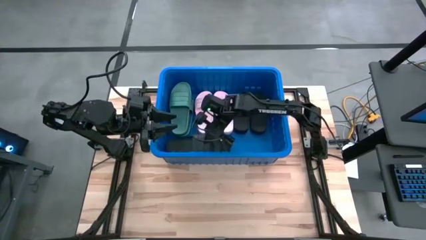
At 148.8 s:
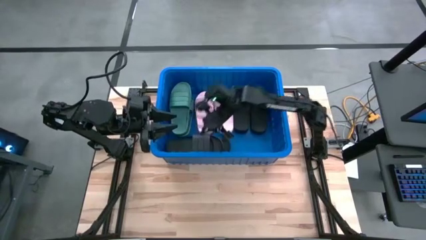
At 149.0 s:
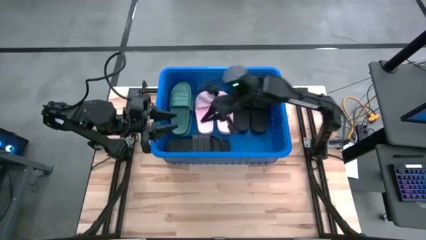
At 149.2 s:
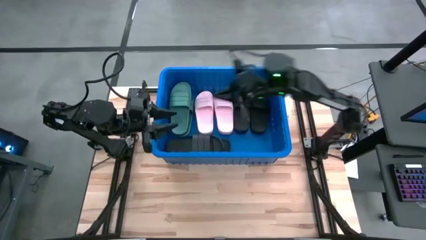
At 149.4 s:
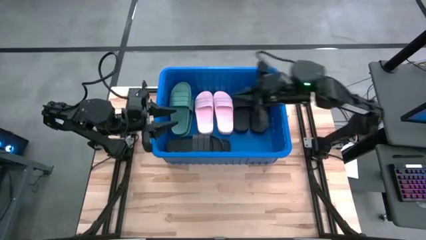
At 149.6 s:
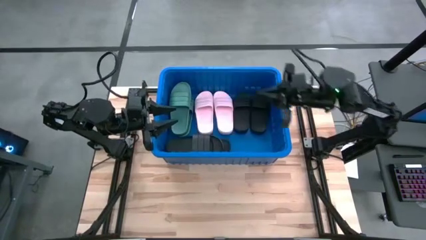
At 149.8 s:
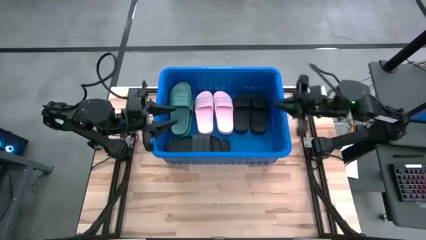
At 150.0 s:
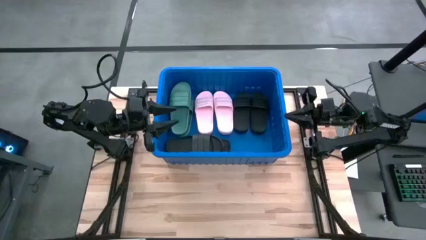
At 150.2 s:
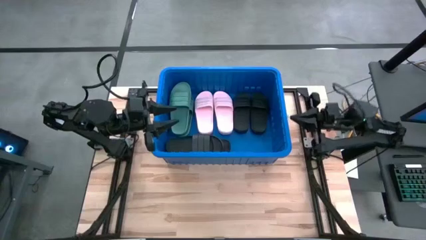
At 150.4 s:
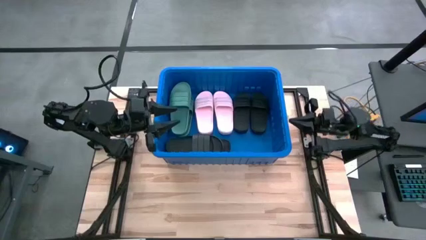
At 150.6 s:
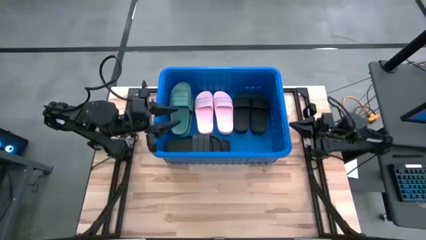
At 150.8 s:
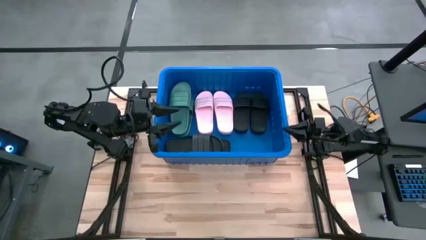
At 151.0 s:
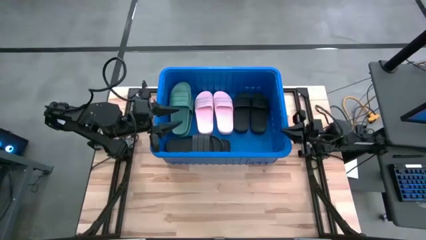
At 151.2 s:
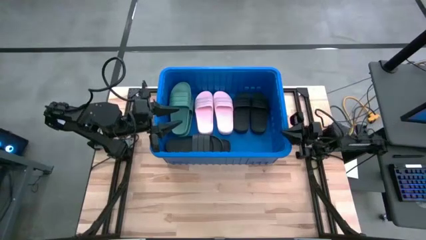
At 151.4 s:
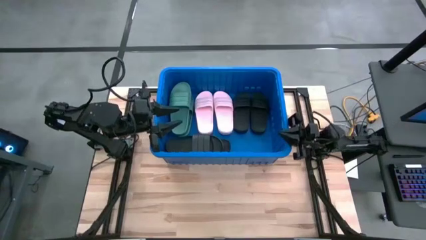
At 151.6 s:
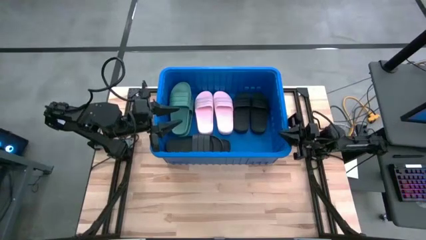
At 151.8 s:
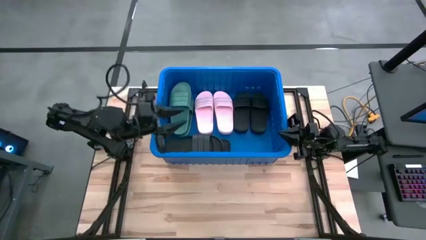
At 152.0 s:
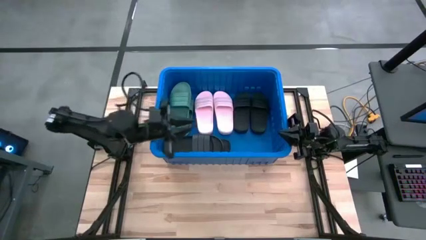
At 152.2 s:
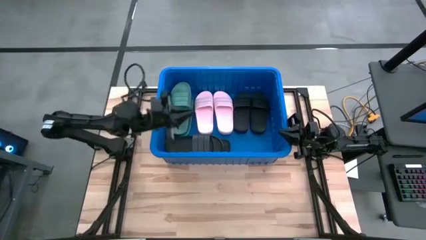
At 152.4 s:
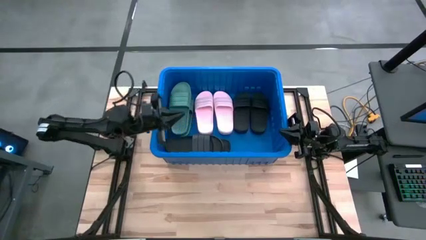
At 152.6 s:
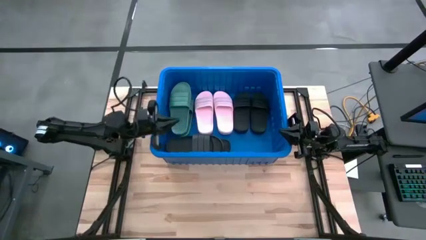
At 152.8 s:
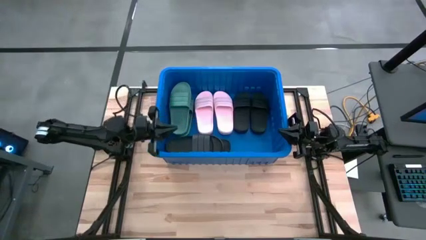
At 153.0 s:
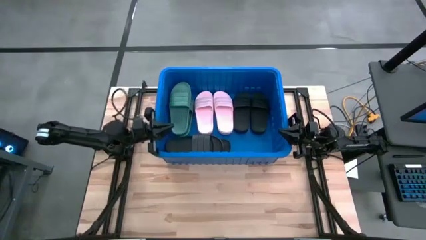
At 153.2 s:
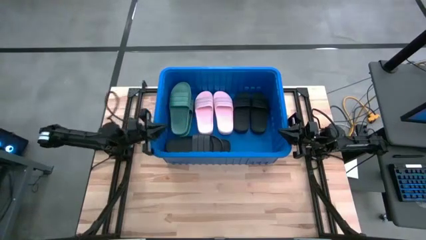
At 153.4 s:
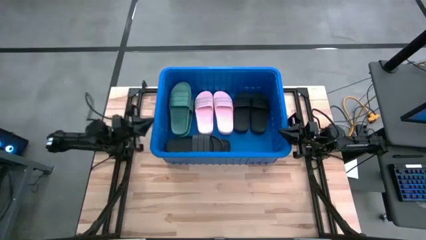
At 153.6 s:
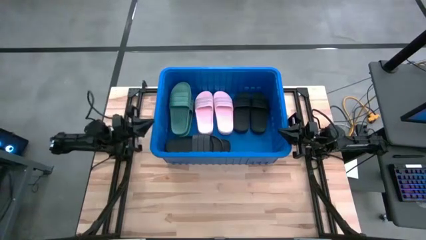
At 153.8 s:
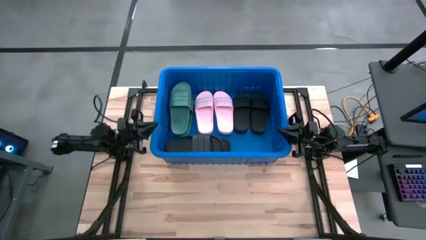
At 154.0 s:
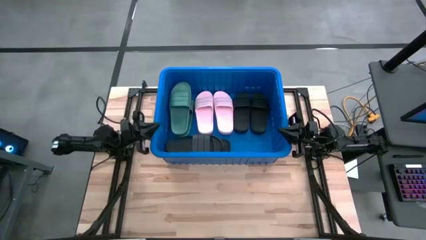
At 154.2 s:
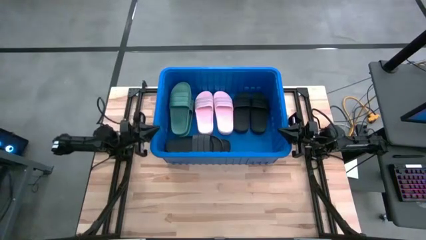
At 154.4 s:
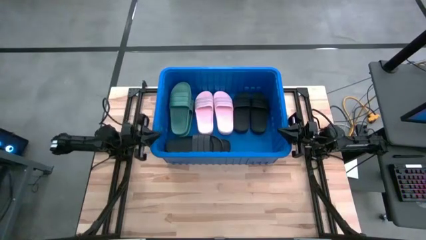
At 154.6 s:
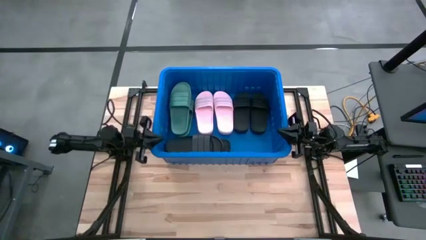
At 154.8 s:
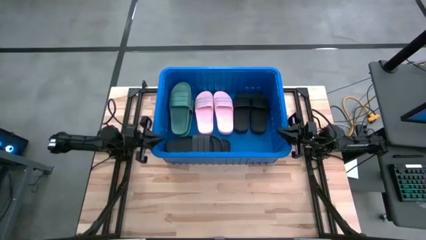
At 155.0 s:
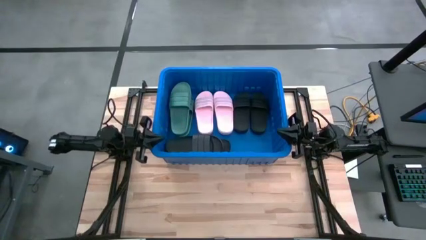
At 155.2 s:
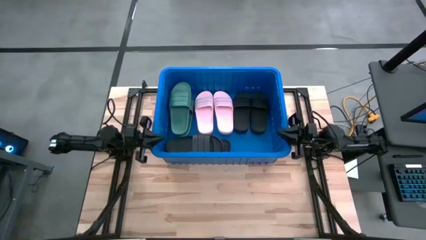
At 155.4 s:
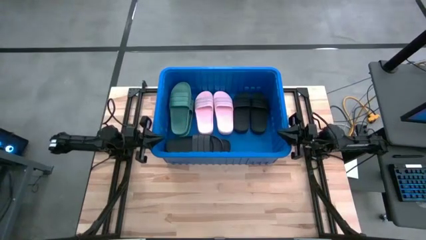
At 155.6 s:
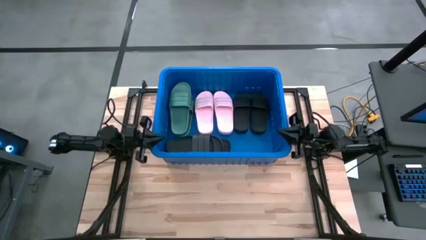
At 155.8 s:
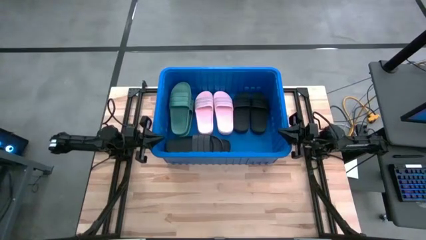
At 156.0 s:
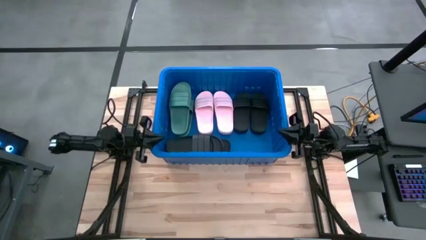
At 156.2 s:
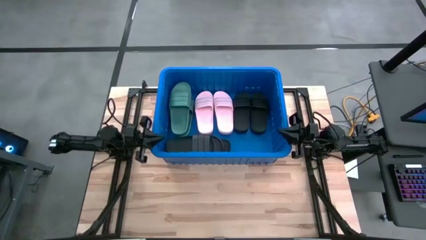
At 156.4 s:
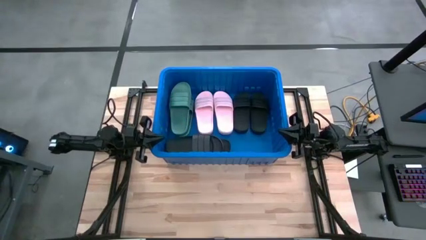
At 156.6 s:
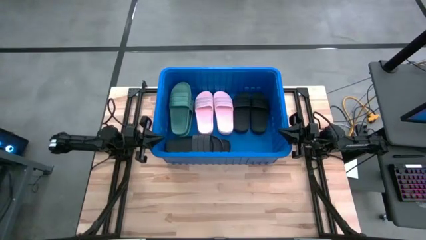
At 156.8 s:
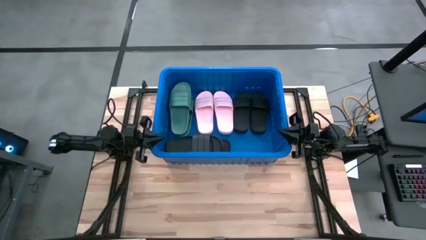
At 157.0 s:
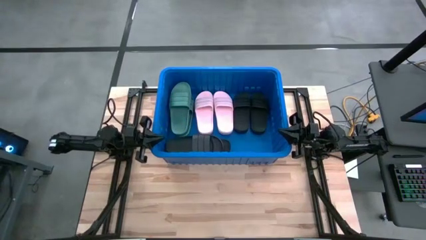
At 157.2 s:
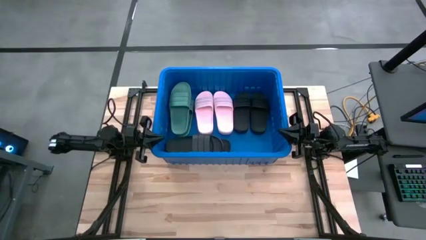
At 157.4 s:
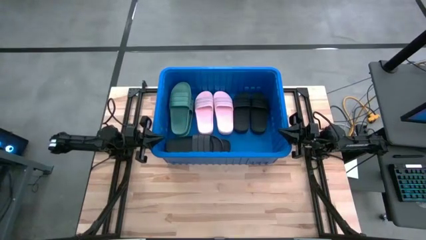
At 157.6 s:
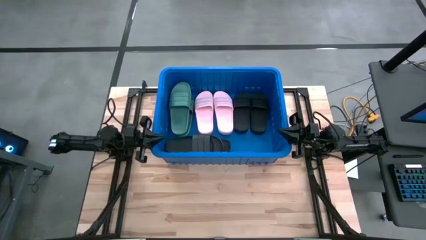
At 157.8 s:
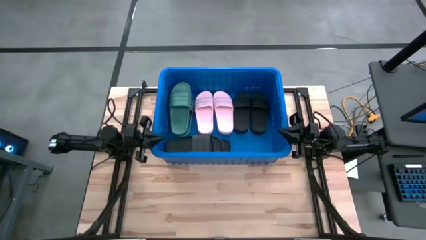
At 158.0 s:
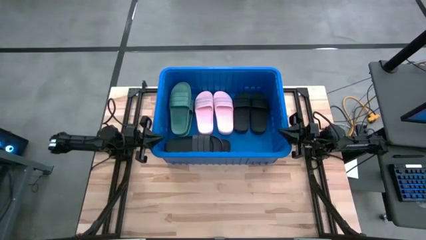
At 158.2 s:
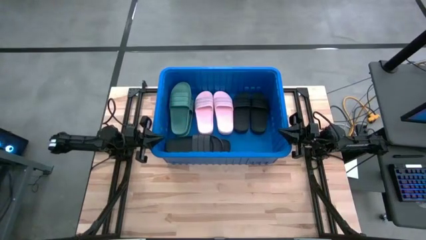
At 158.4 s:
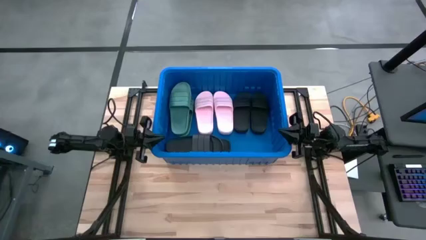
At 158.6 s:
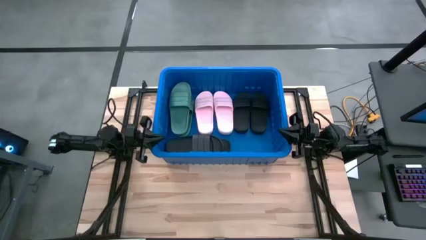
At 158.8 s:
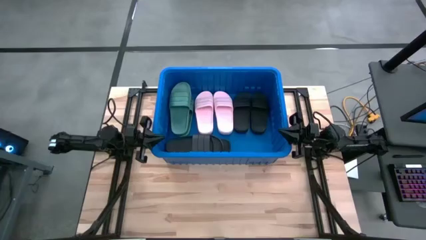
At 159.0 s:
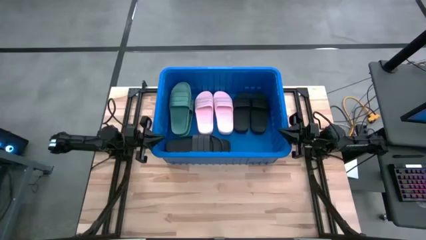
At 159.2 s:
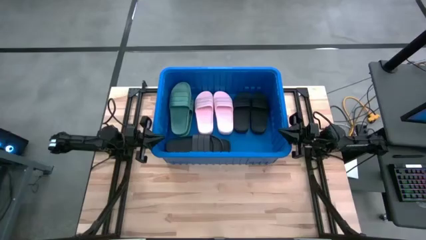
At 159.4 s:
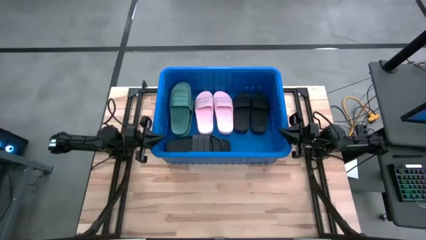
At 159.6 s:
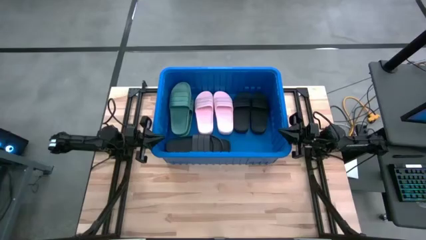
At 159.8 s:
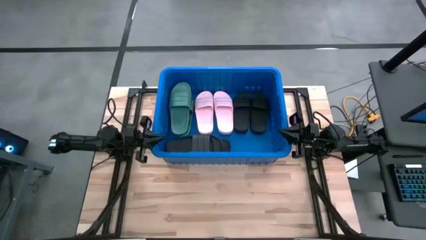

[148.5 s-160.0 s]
Task: Pick and place slides into bin
Return to home position
